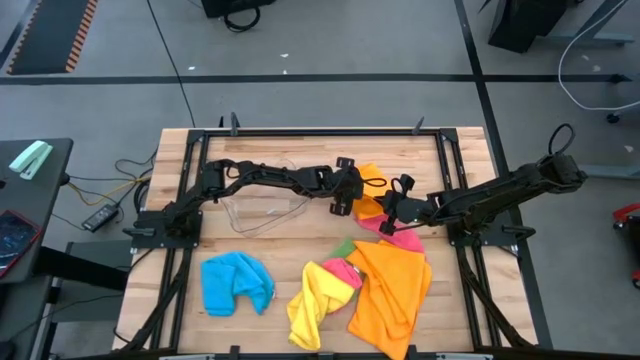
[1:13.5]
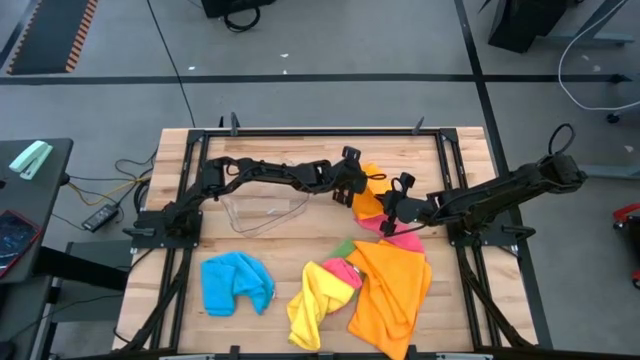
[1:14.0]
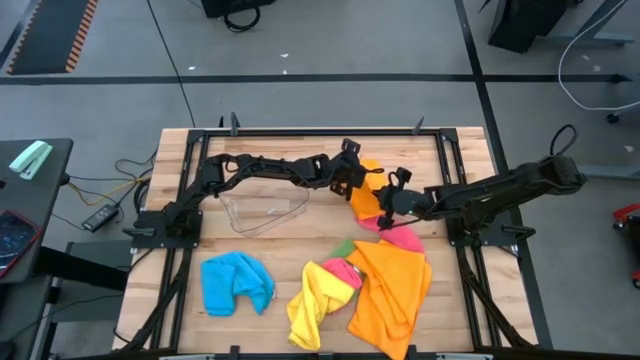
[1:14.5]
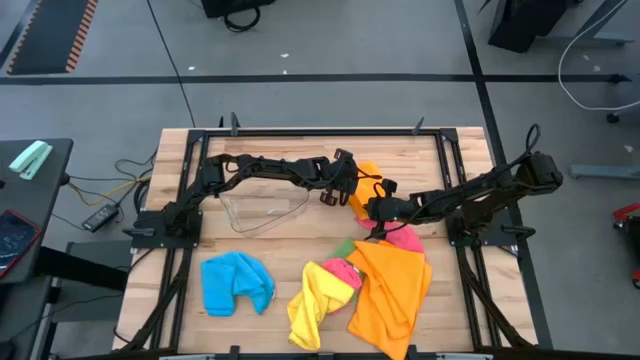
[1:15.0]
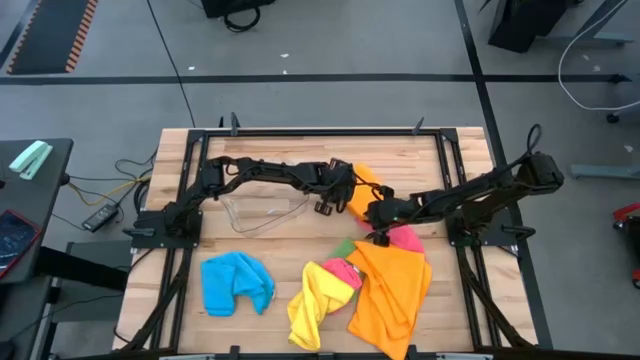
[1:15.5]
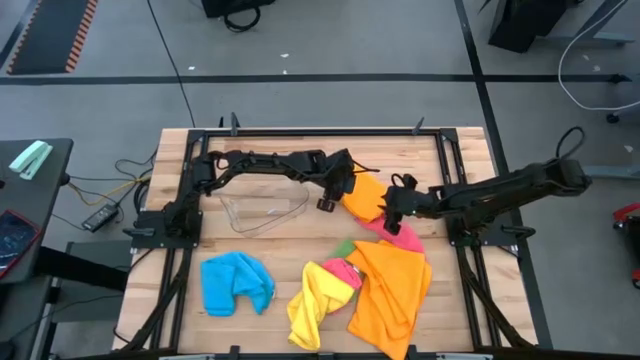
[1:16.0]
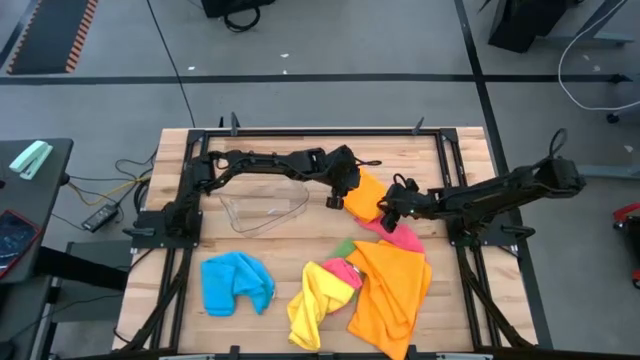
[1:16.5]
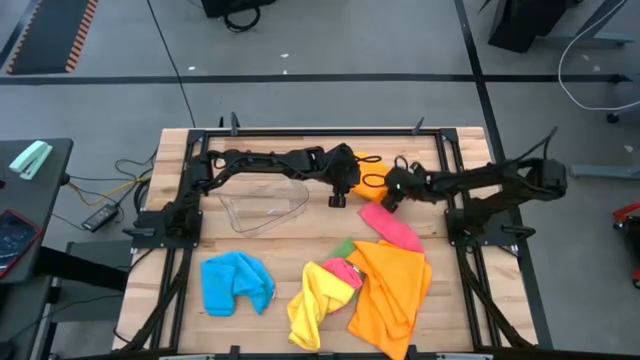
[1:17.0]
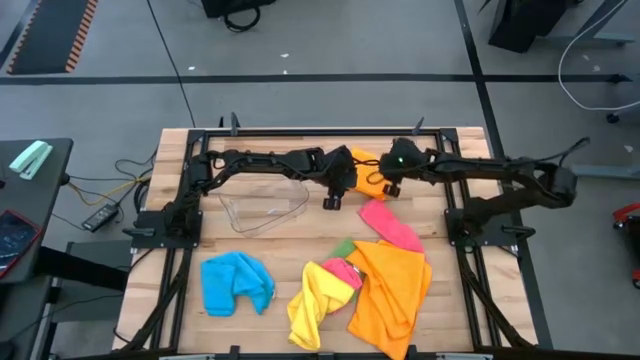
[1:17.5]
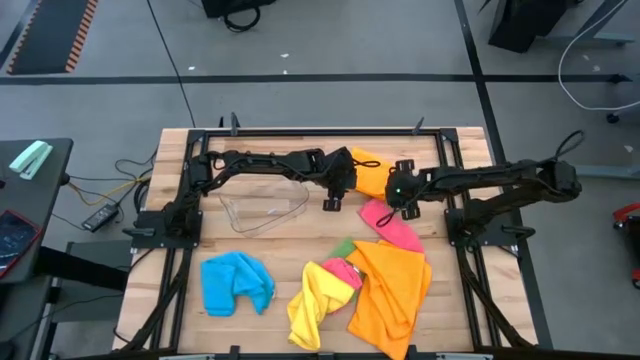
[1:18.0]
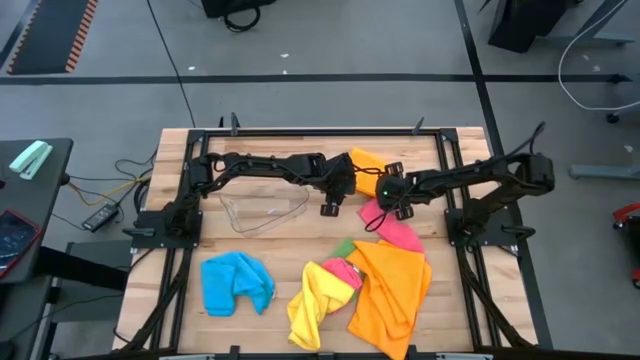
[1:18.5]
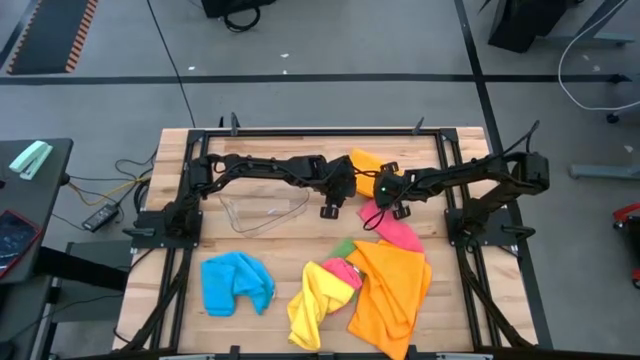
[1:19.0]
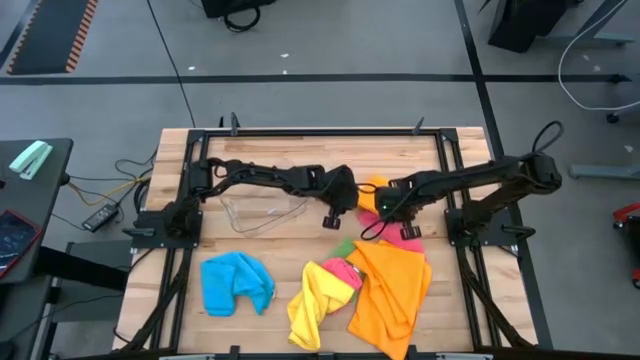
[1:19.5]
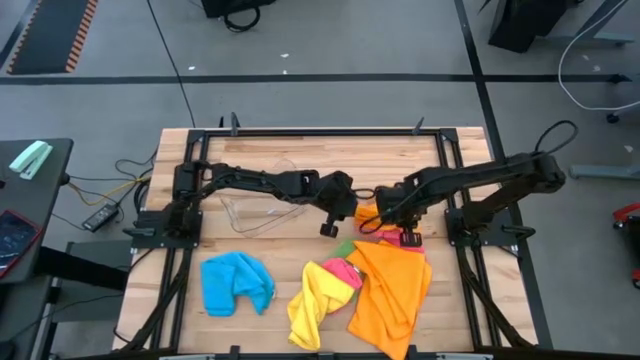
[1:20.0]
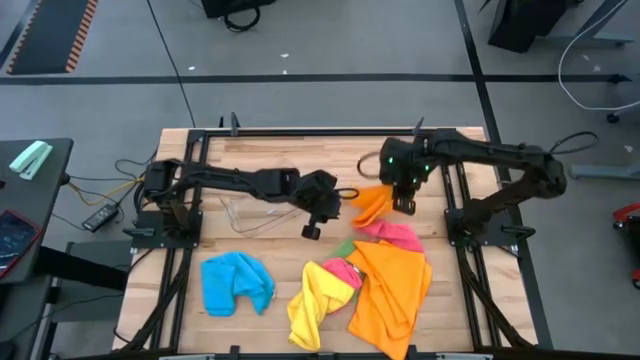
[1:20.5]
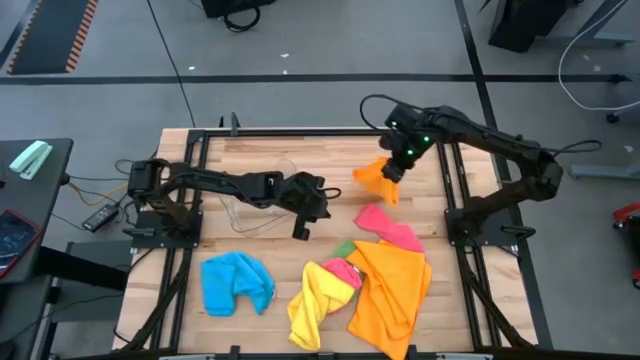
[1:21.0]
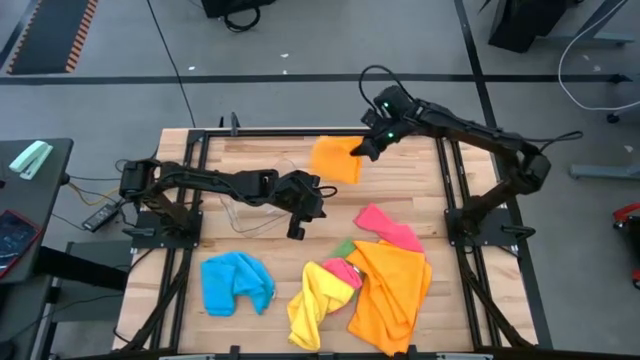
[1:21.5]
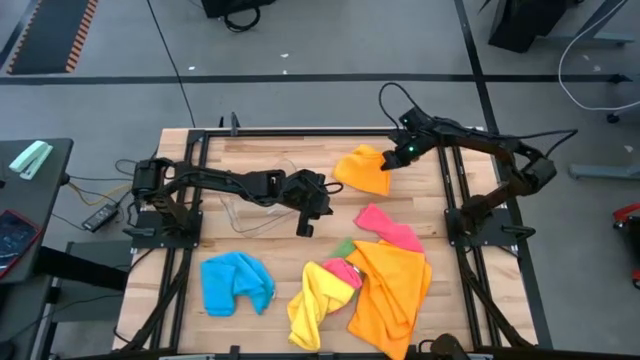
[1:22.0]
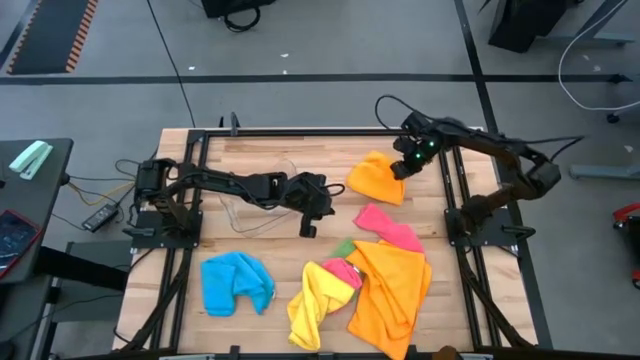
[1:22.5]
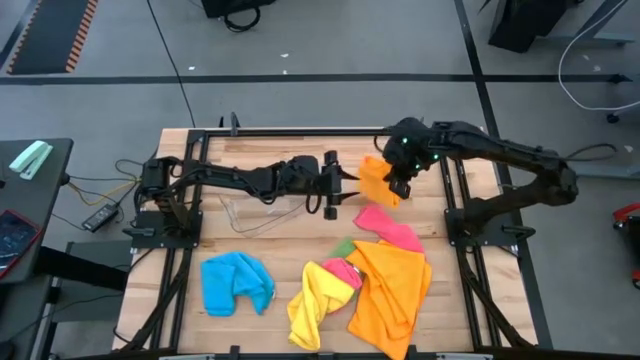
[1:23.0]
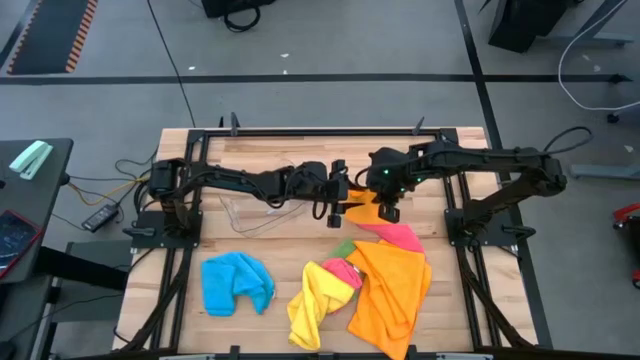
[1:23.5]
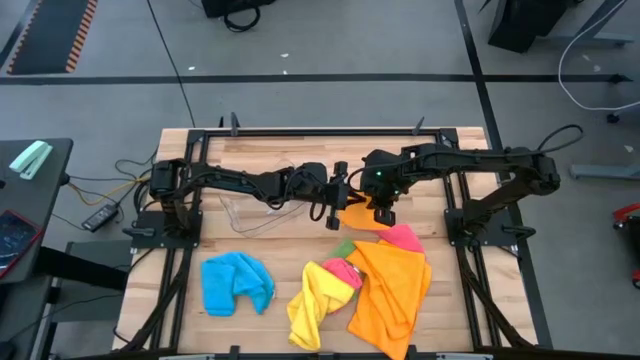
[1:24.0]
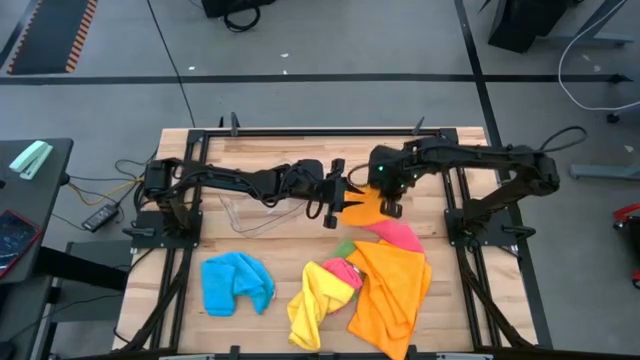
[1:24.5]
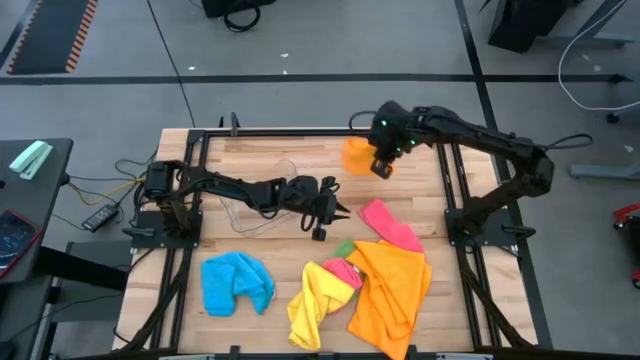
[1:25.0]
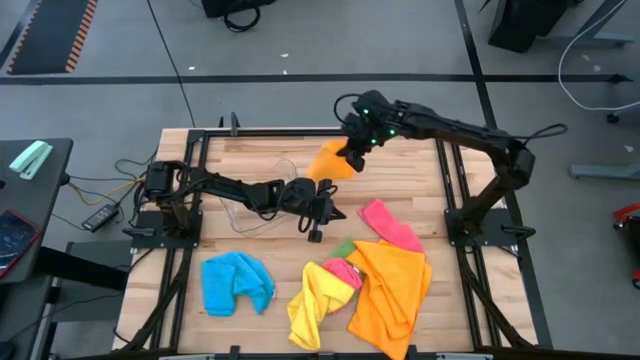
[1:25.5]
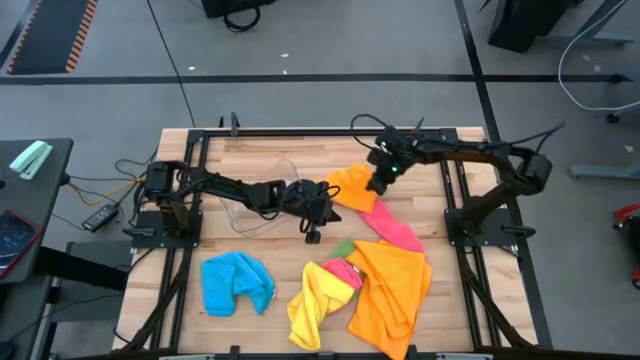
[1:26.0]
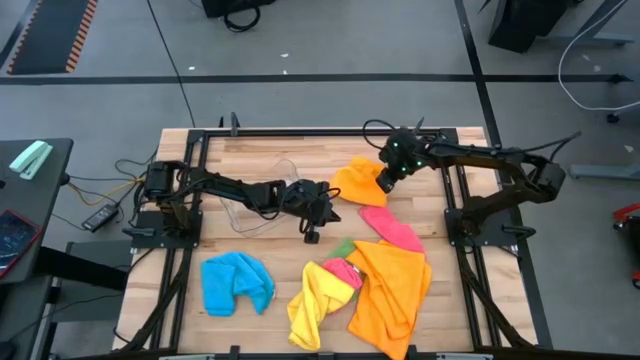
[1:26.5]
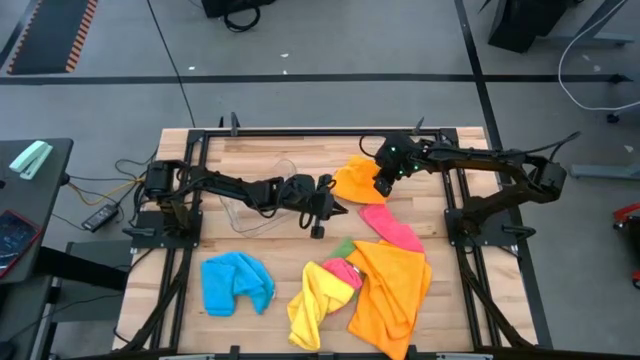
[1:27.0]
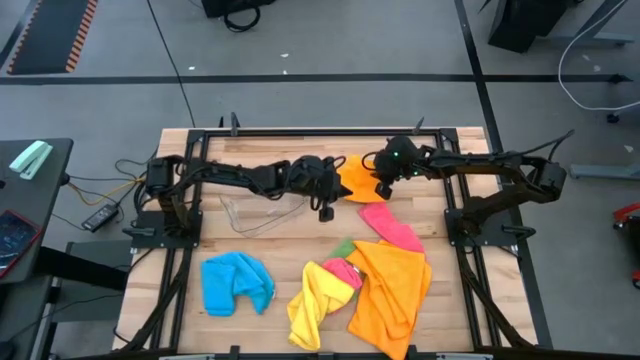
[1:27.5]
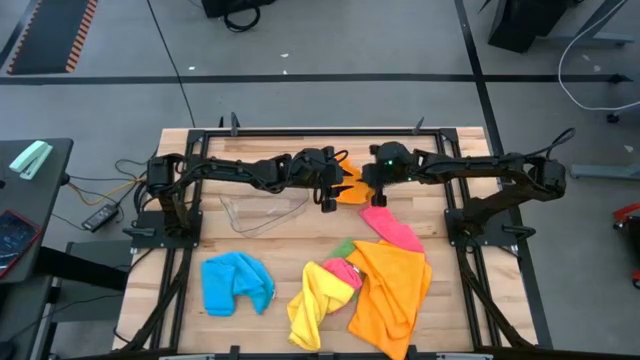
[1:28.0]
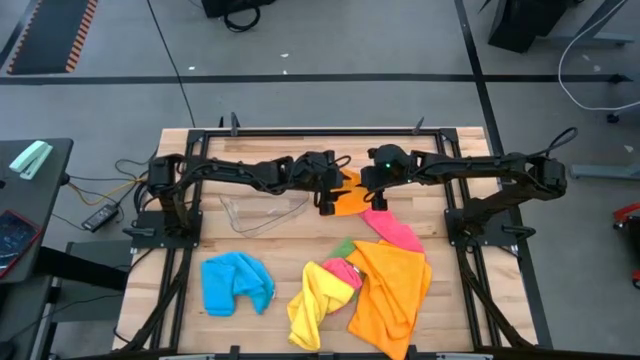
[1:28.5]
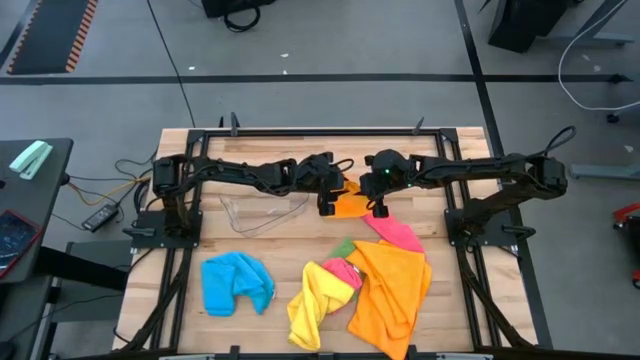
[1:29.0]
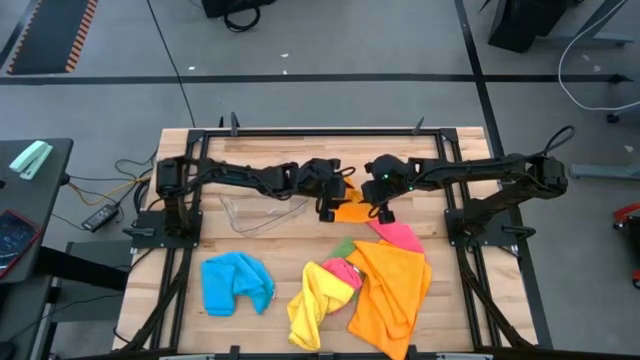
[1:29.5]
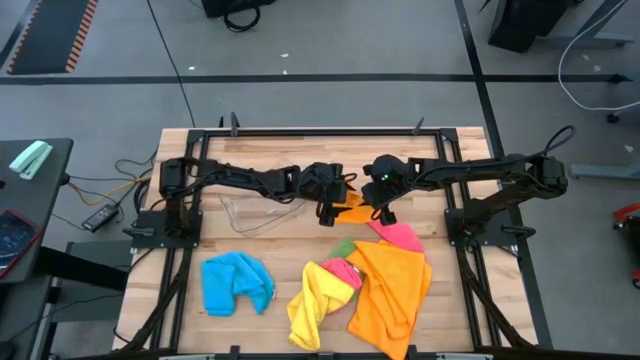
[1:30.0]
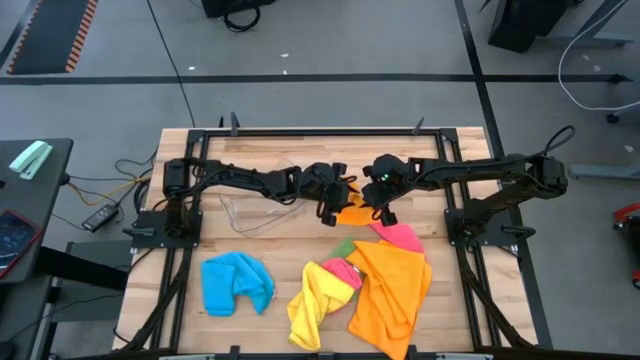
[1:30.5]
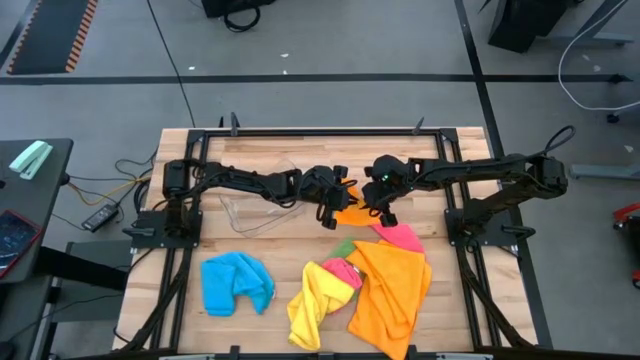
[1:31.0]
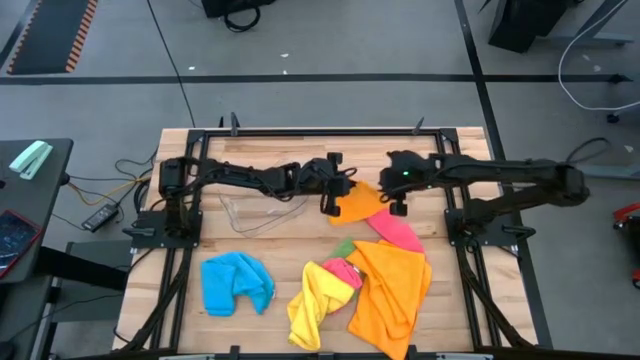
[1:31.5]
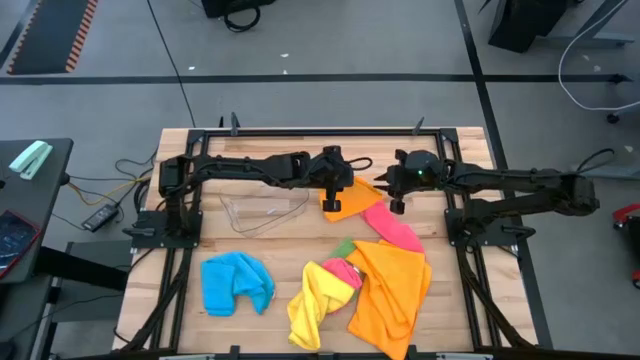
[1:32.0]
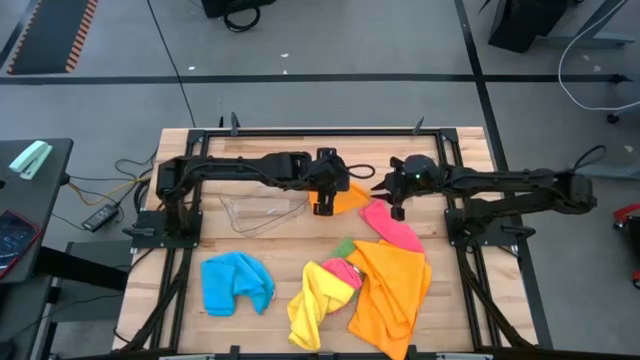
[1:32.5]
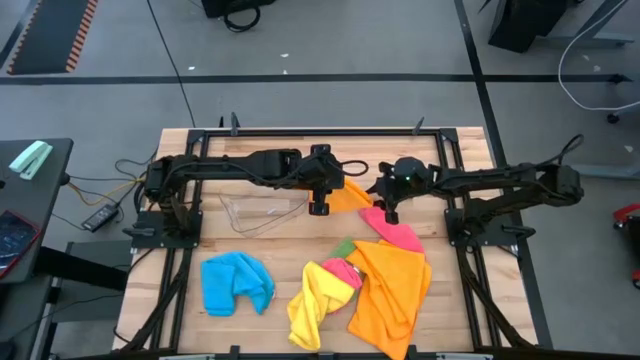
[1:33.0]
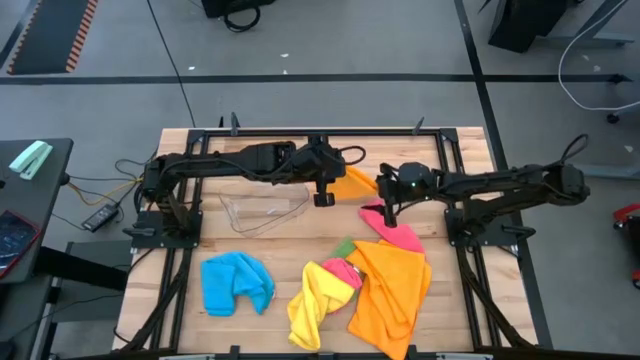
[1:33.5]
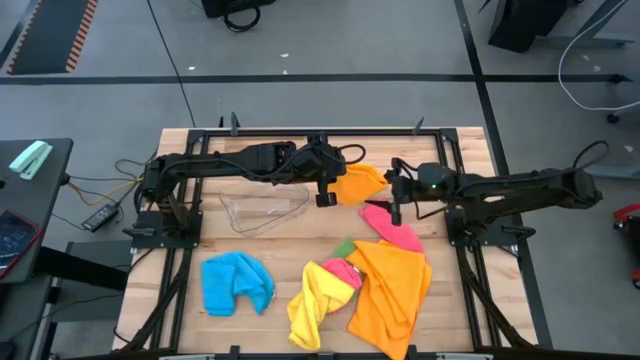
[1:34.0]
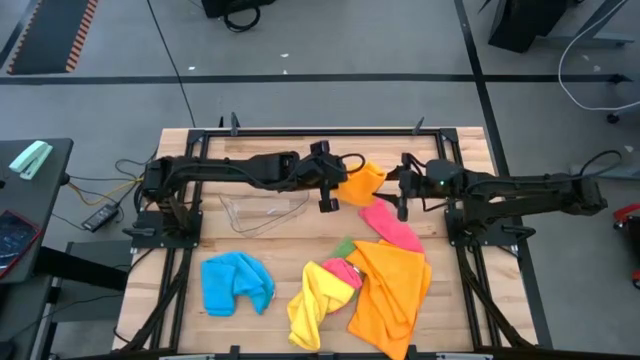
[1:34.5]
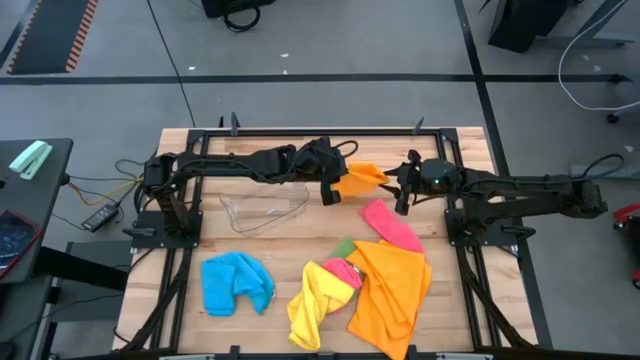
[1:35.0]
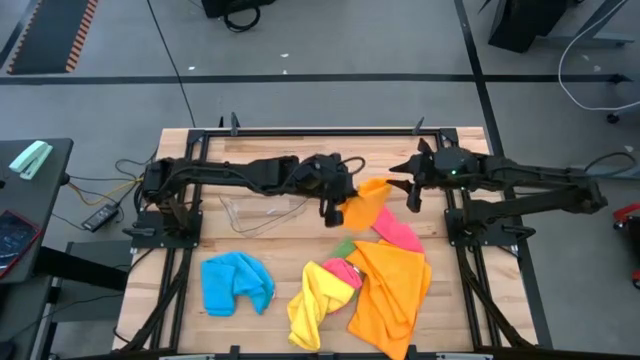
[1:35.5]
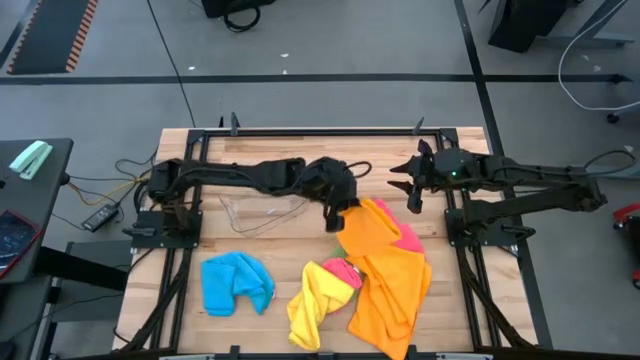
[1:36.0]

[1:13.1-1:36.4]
Task: Fold microfiber towels
Fold the orange microfiber towel
